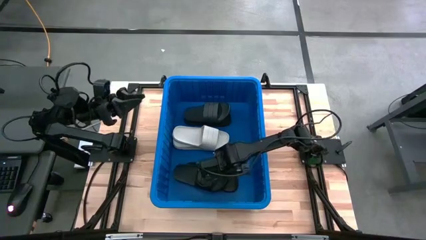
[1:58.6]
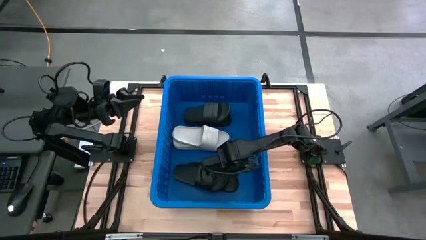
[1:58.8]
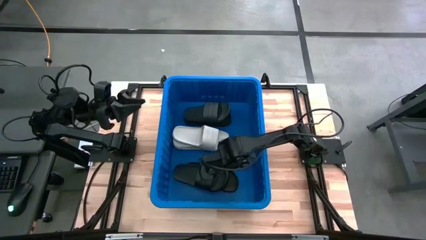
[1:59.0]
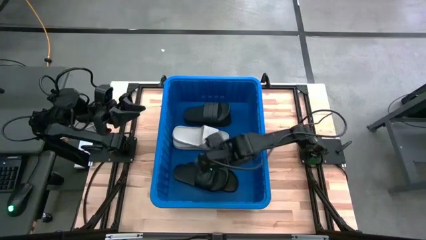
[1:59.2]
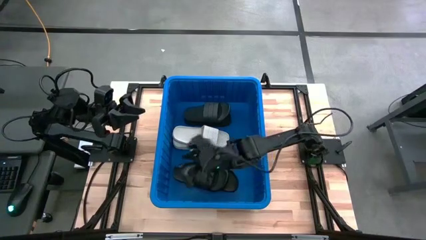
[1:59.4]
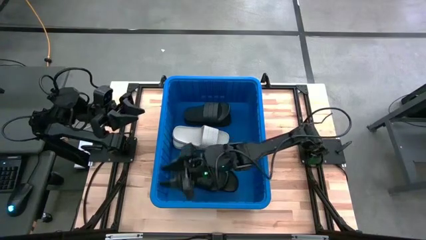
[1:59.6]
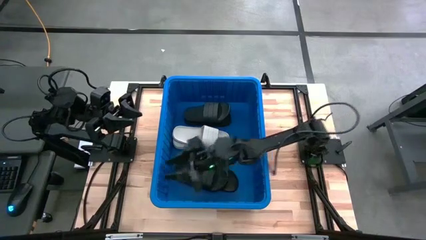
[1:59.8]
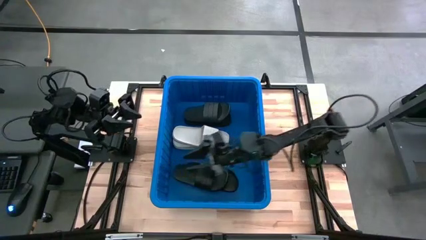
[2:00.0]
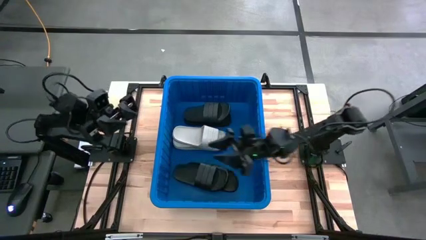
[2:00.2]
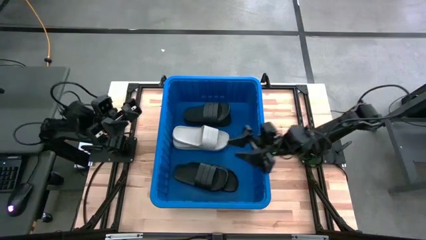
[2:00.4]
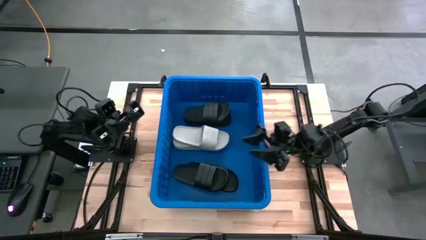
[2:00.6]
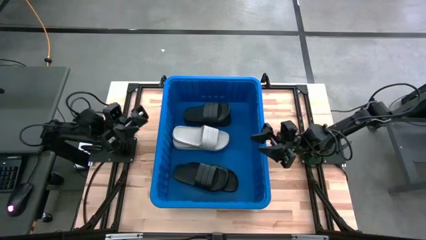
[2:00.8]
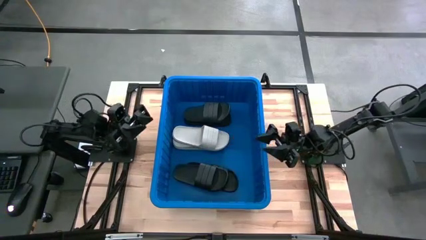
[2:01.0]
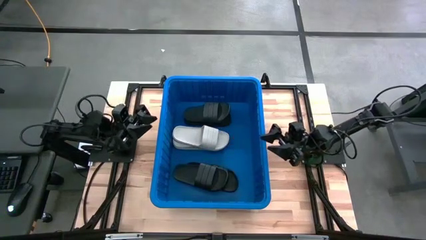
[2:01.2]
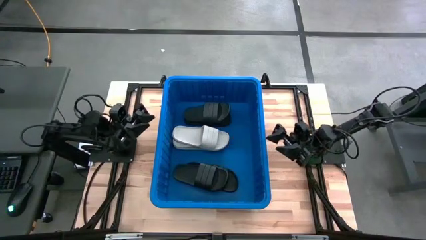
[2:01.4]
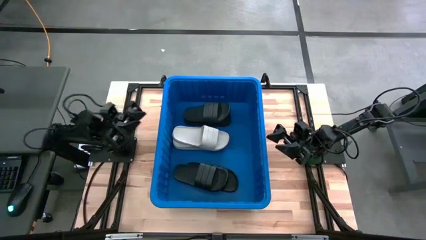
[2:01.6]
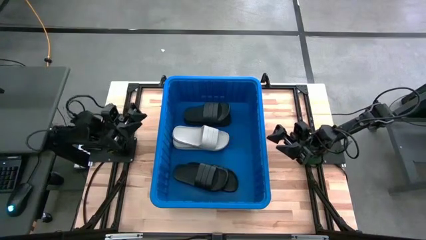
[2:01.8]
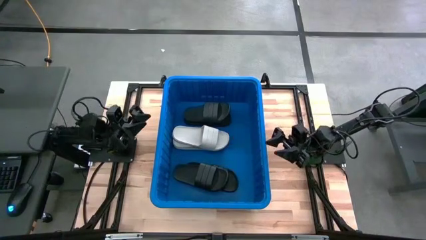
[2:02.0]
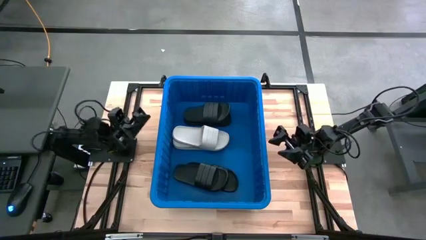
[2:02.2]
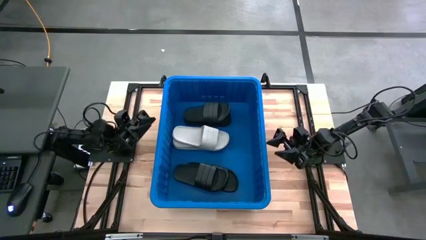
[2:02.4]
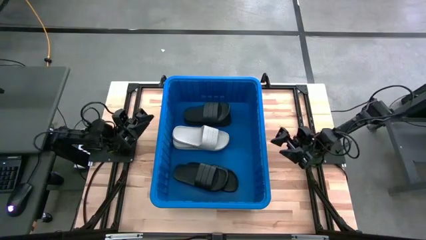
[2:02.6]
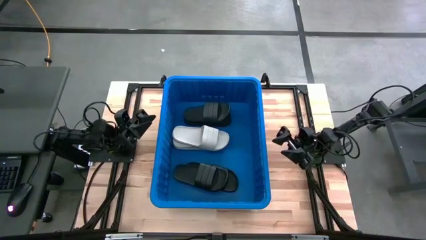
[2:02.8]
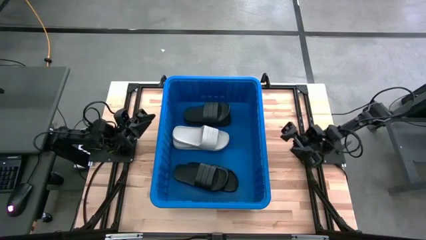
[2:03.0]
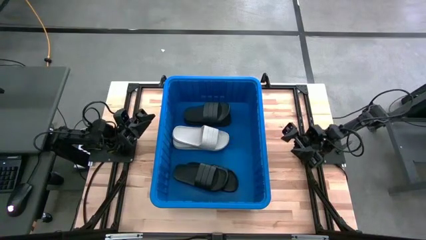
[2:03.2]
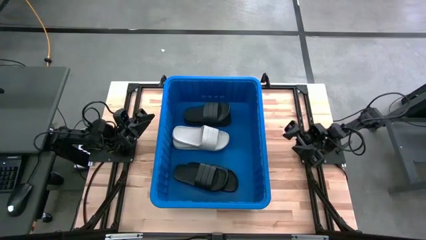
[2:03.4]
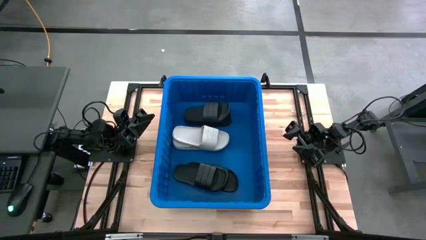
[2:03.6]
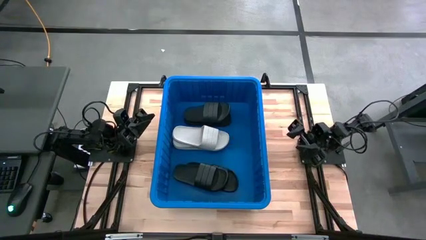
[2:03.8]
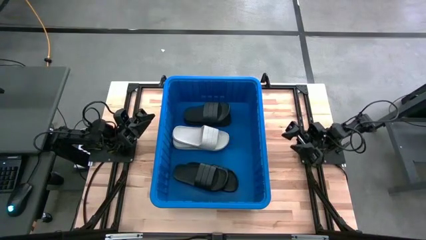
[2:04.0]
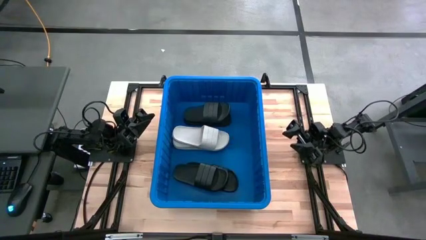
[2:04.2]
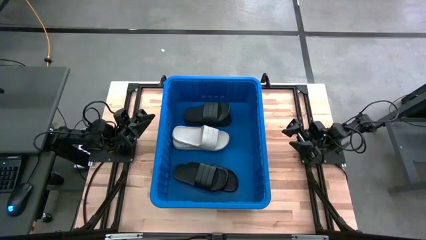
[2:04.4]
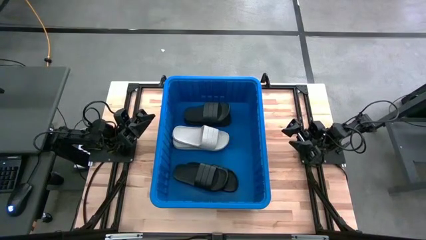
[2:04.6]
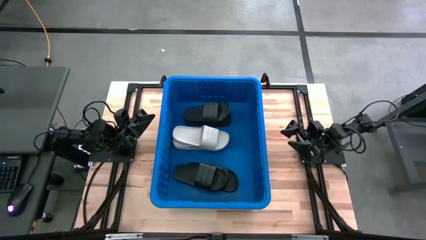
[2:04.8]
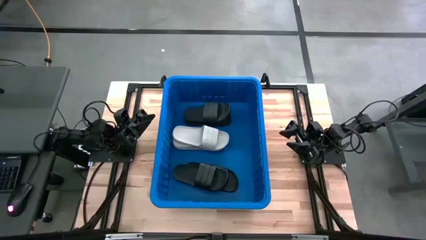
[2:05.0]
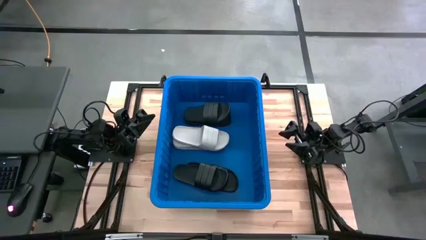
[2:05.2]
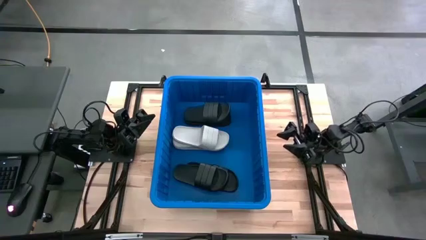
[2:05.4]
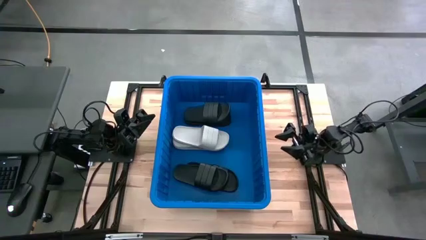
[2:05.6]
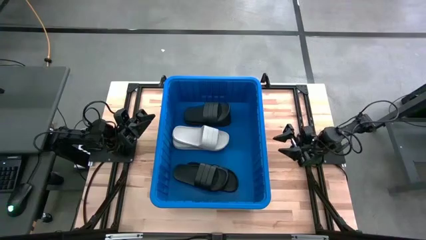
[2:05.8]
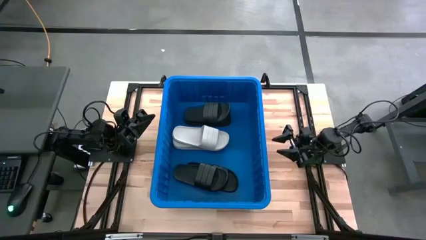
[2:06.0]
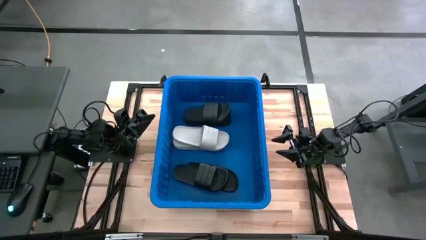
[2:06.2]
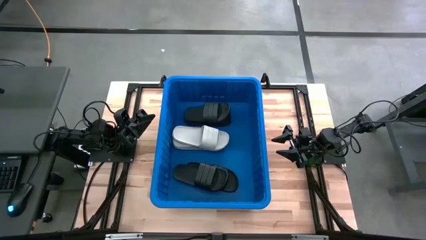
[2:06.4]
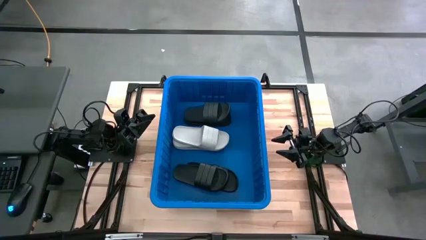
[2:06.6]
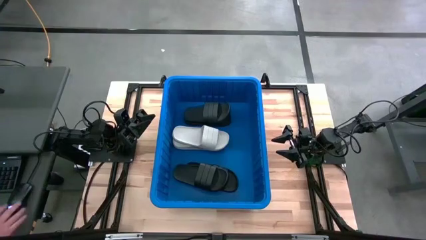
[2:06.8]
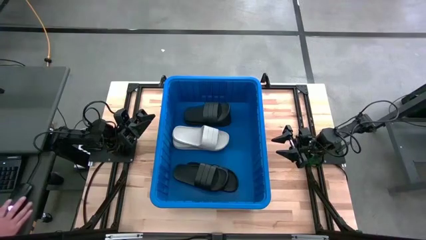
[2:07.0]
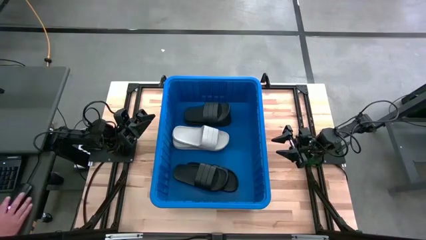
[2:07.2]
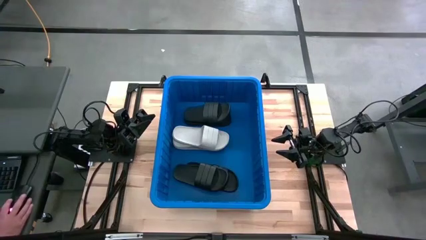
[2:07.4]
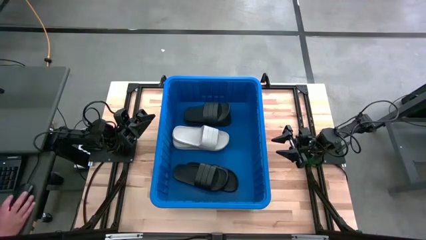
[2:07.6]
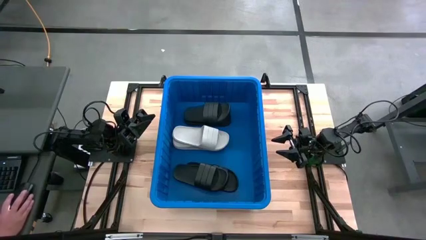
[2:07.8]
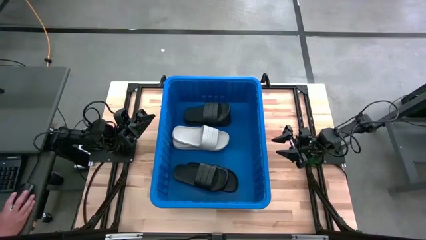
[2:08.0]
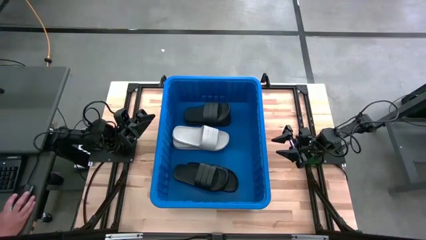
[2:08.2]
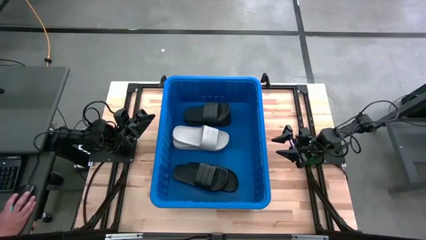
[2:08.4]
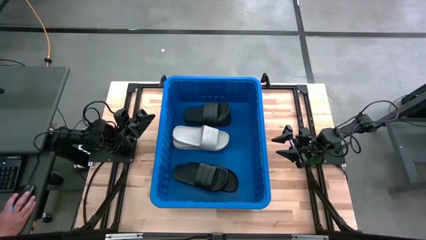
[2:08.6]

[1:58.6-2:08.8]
Task: Pick and place slides into bin
Return to Home Position

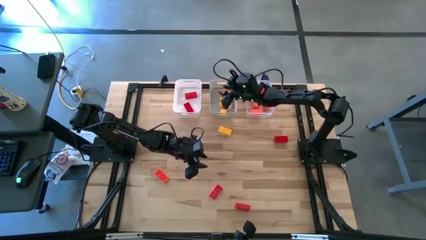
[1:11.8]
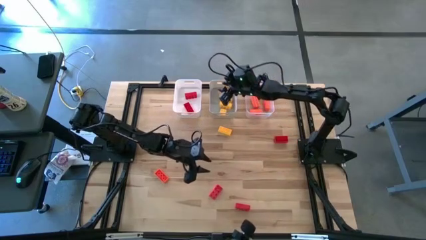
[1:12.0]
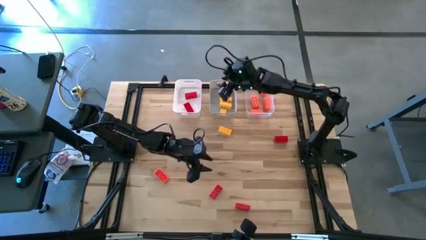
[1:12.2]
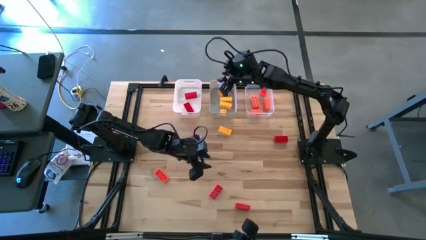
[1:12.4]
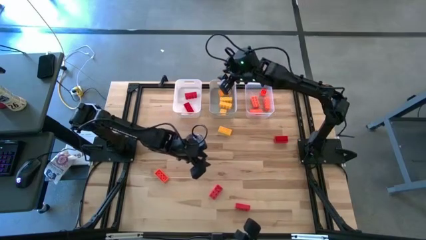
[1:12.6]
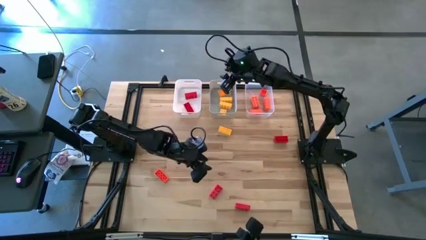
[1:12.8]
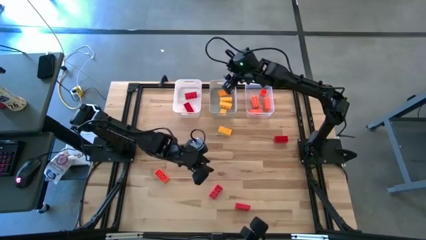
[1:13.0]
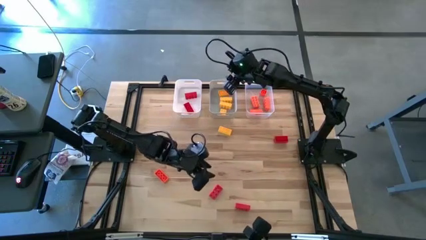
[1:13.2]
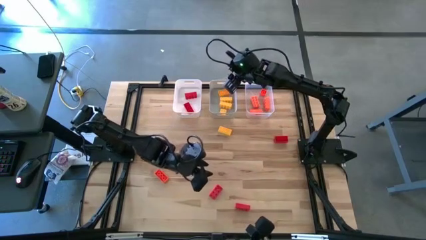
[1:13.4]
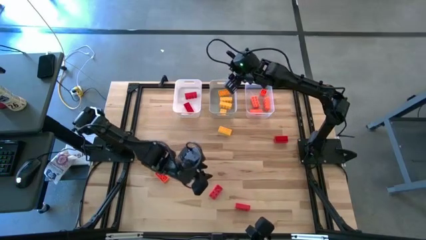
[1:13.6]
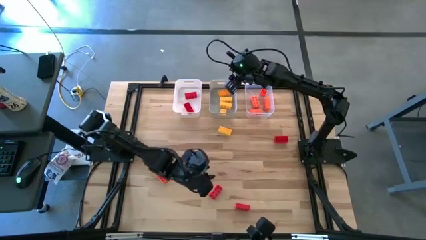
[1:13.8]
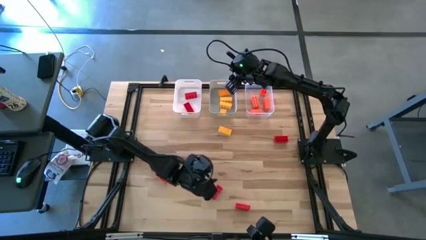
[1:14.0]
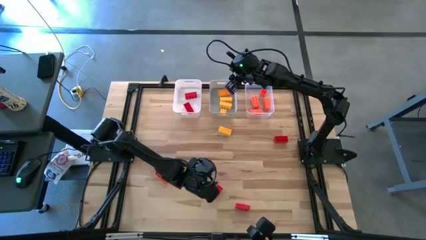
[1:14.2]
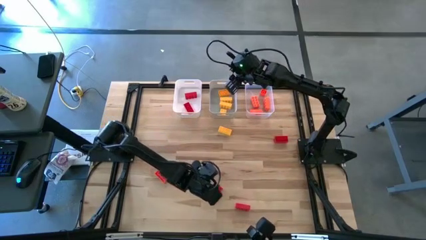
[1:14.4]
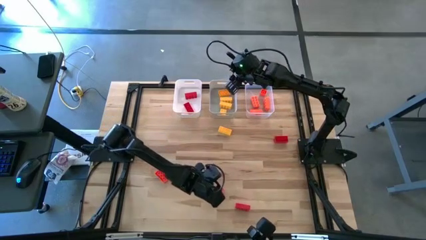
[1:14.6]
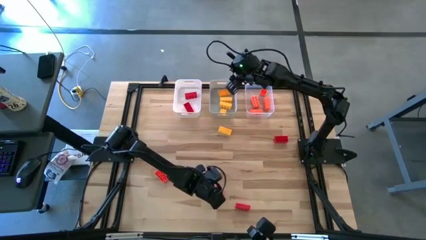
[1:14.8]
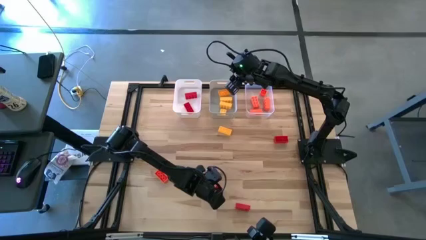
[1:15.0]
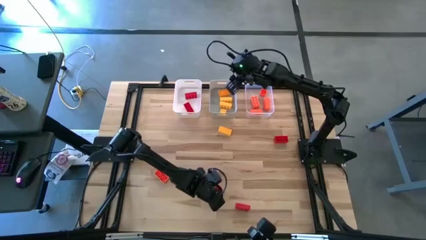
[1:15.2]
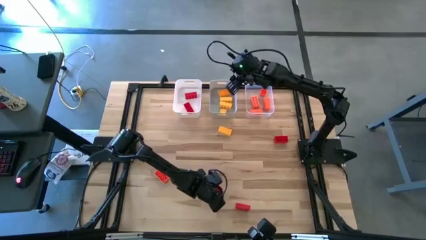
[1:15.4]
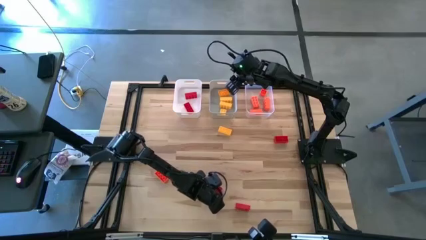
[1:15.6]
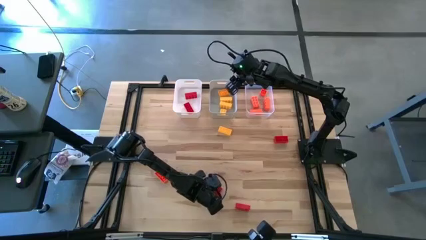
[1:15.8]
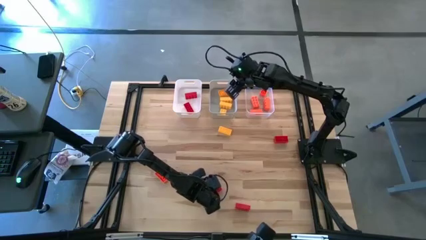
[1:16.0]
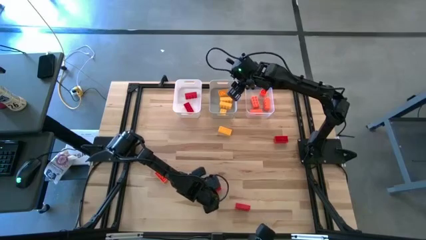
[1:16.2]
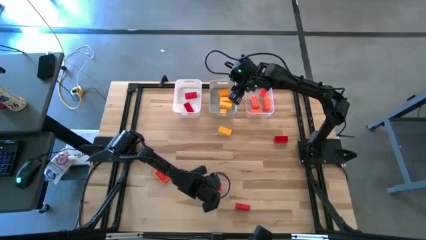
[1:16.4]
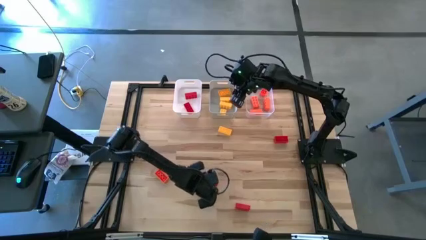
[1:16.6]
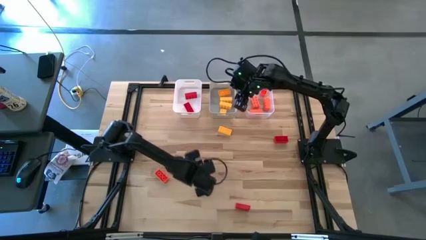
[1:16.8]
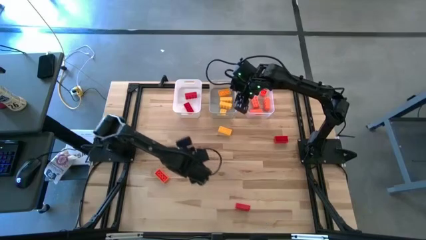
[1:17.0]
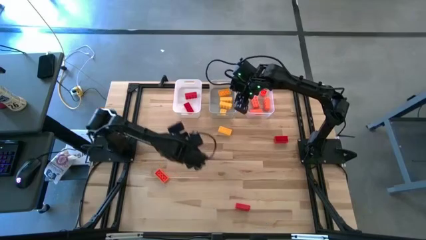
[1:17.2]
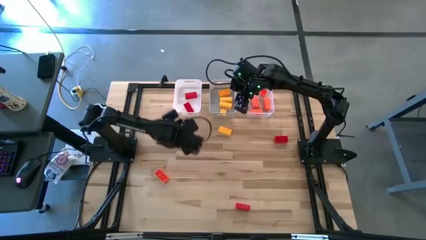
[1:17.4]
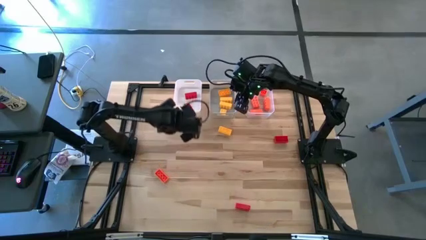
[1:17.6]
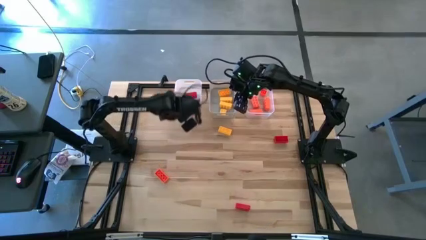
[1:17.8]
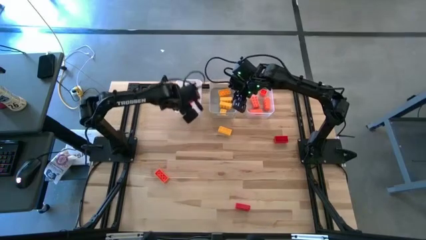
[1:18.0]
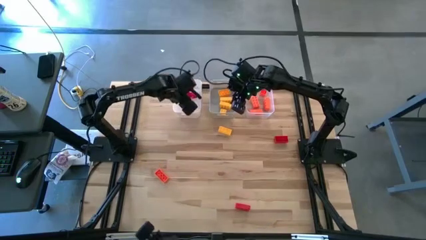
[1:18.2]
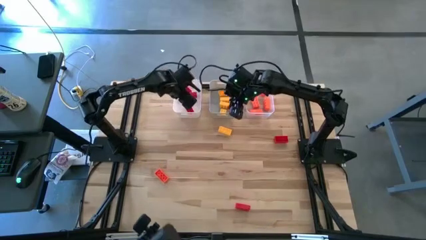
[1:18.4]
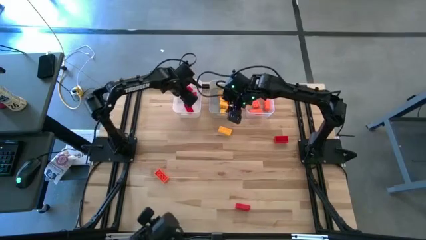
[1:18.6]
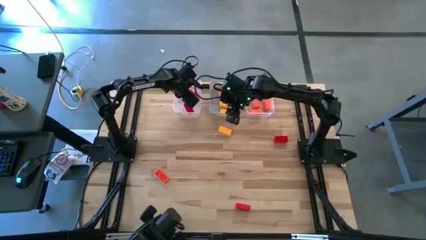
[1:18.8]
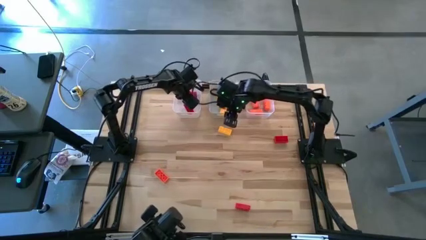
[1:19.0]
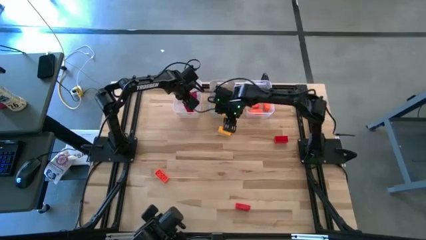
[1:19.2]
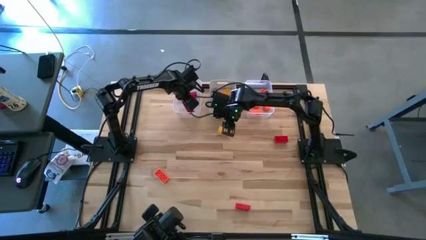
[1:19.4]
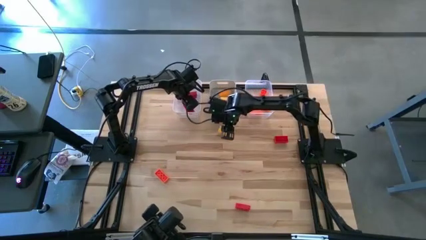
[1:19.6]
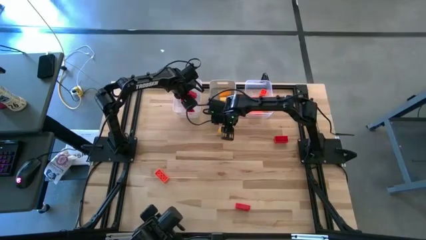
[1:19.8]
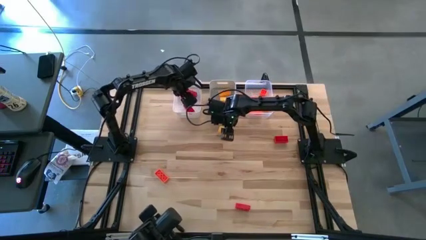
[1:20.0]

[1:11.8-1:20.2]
Task: Sort & place blocks by color
Put the red game piece into the white bin
